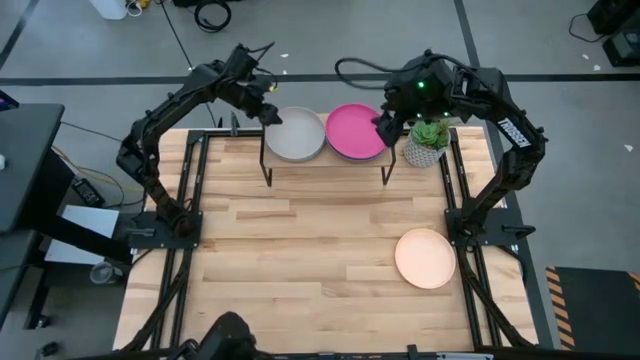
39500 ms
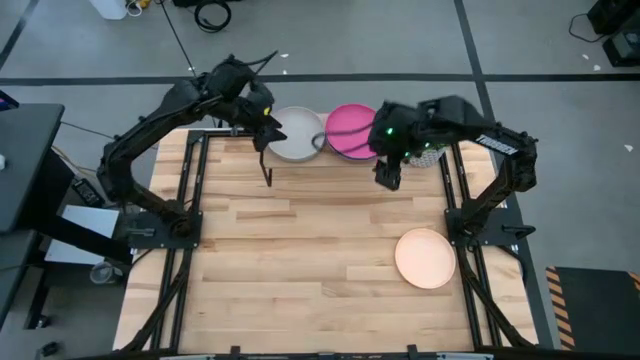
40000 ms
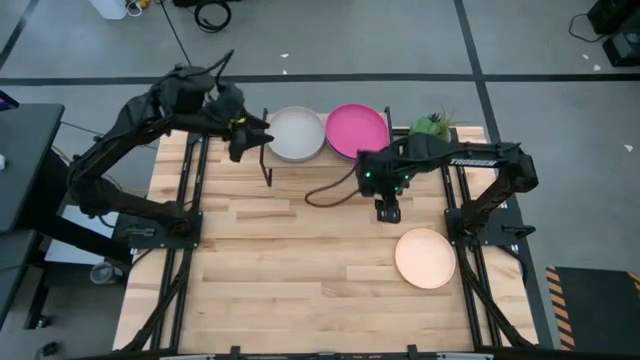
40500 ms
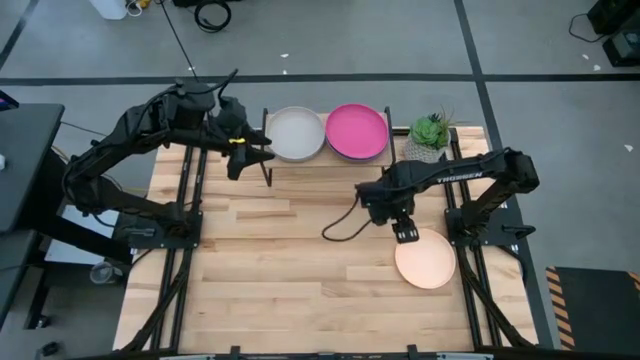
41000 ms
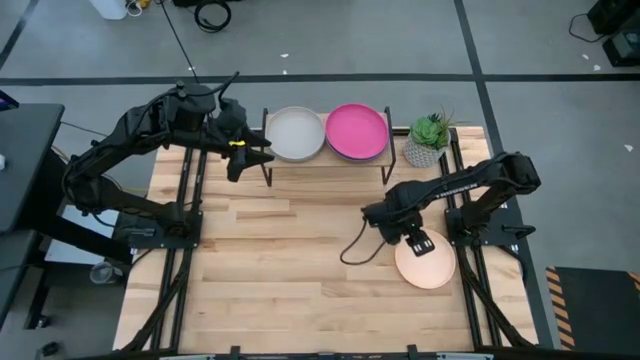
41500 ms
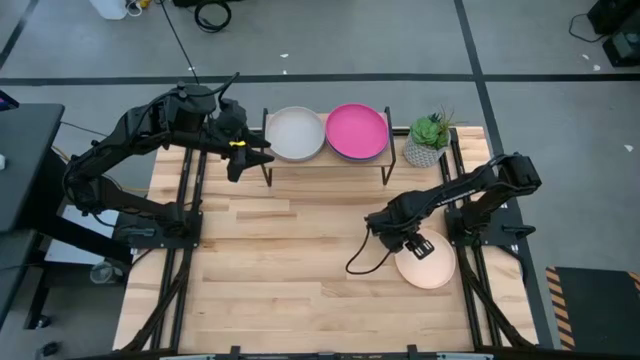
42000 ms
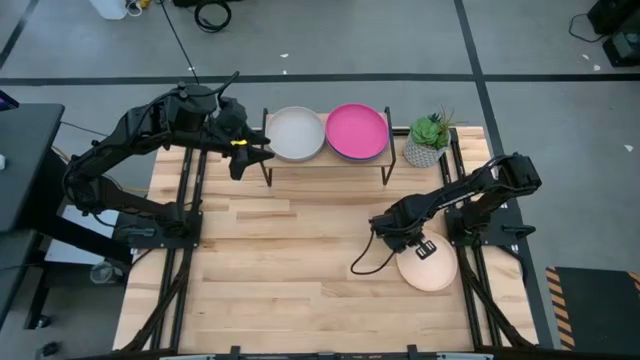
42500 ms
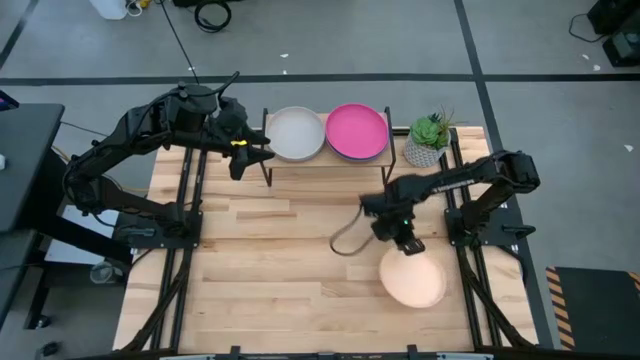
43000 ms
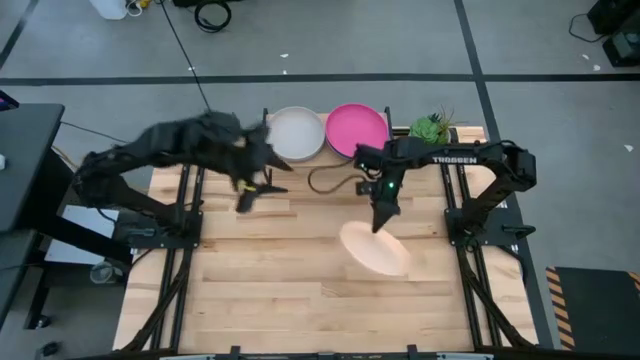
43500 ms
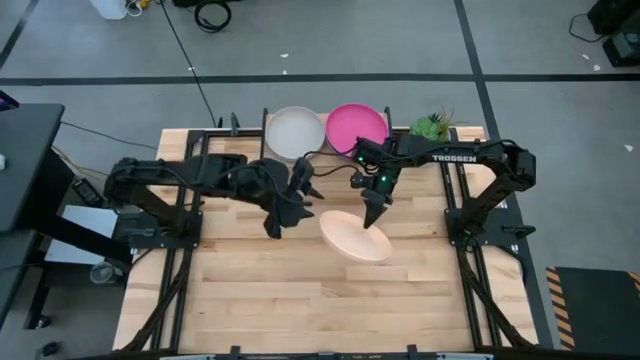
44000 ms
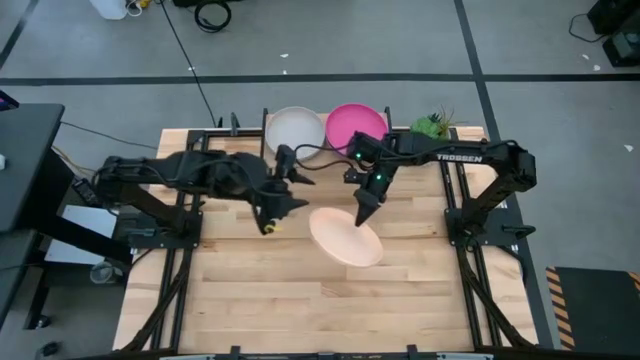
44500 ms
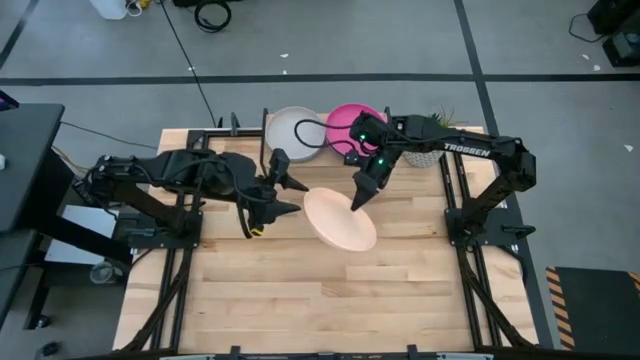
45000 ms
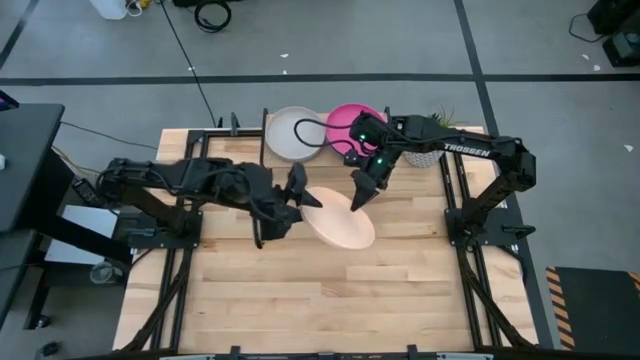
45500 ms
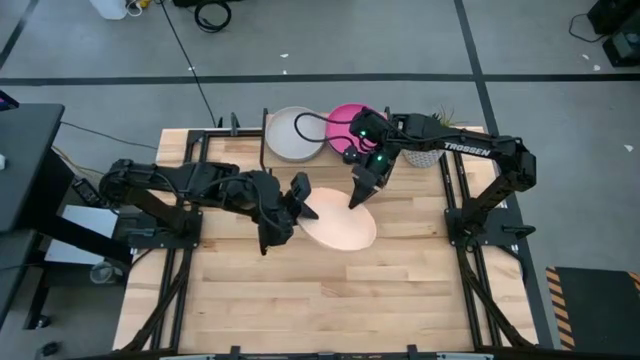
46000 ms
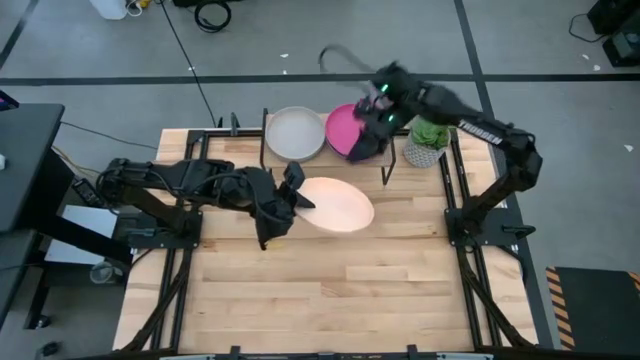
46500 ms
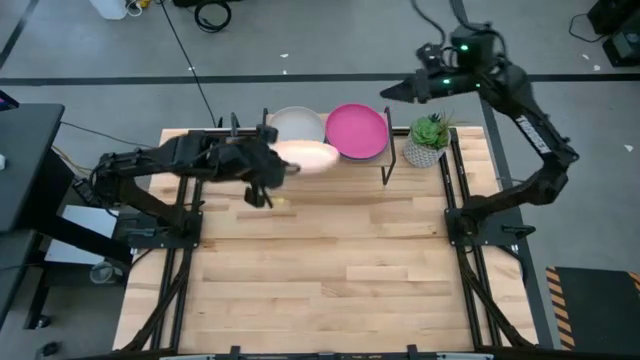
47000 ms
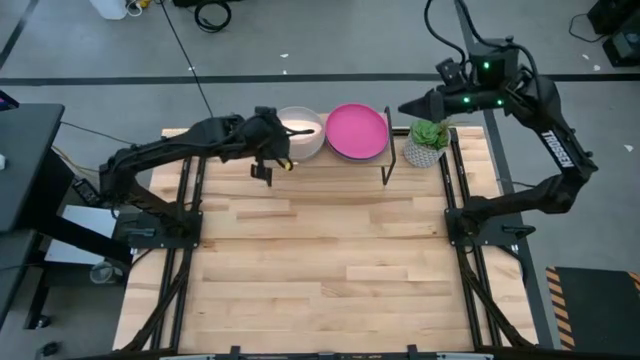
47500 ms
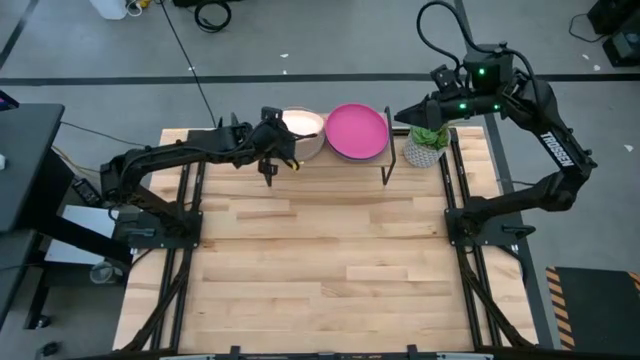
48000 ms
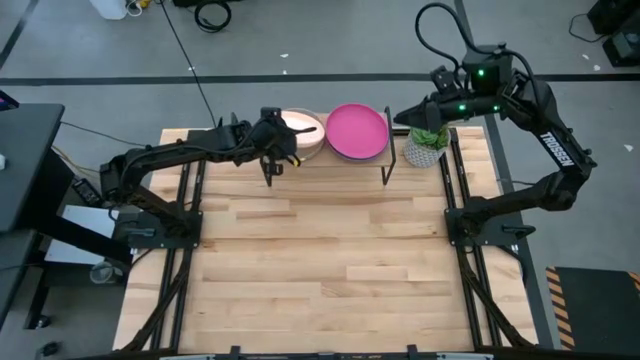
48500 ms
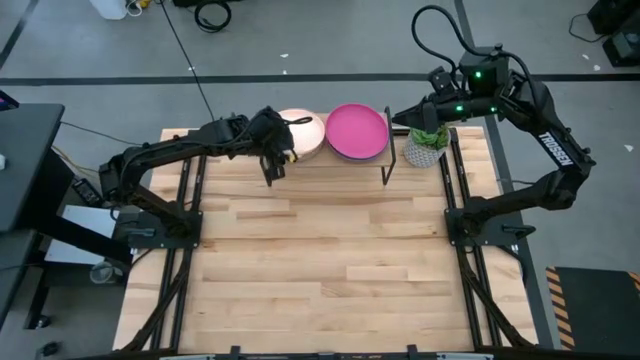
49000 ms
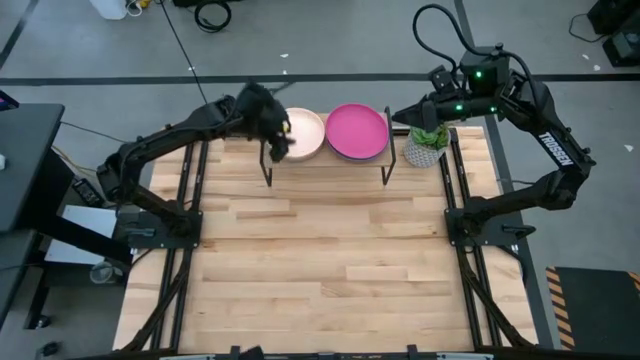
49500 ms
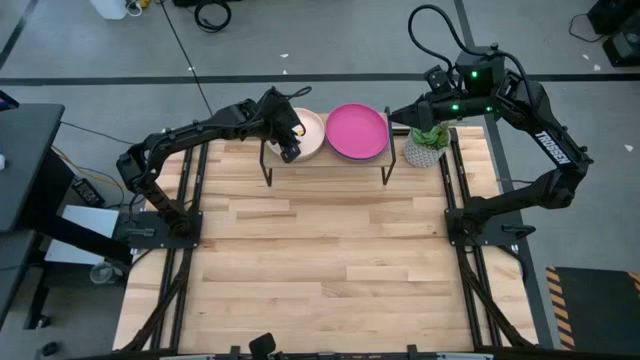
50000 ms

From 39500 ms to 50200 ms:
Task: Place and stack plates onto a shelf
Stack the light orange plate on top of the gray plate on the shelf

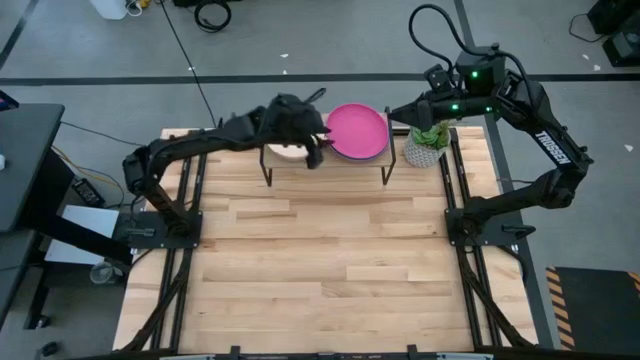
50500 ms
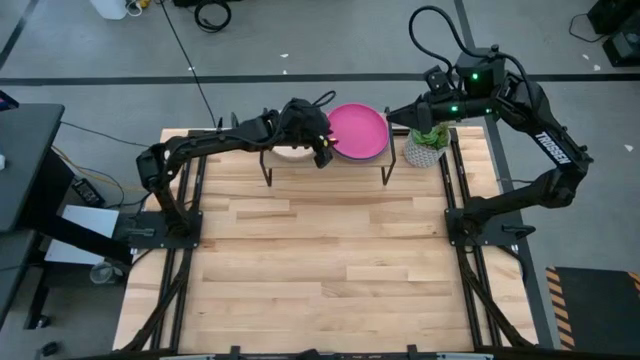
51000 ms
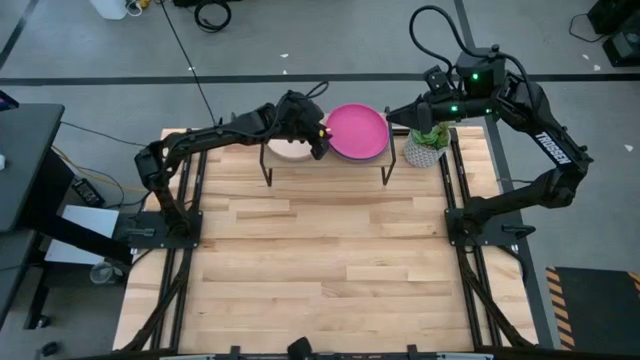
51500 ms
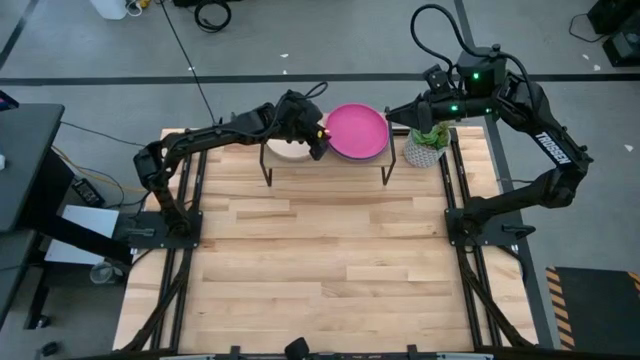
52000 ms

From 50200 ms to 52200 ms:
Adjust the right stacked plates on the shelf

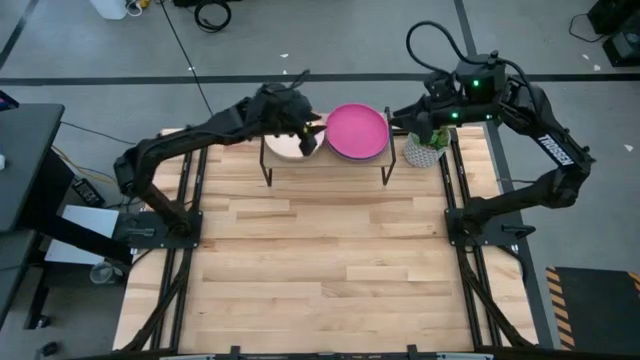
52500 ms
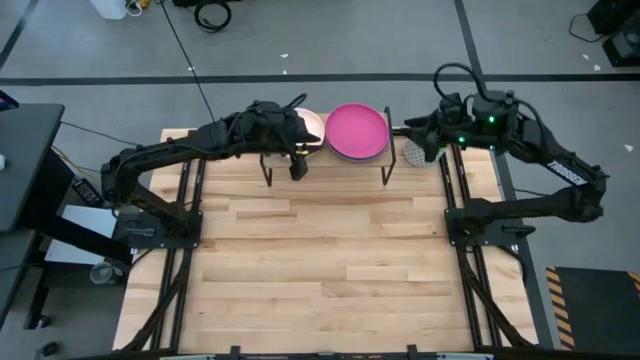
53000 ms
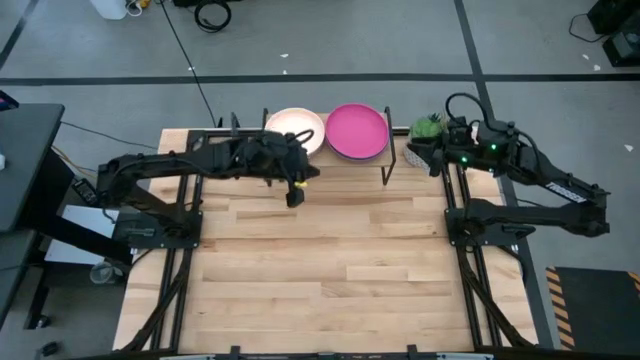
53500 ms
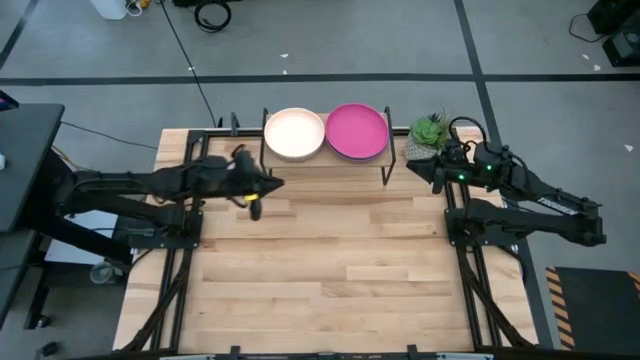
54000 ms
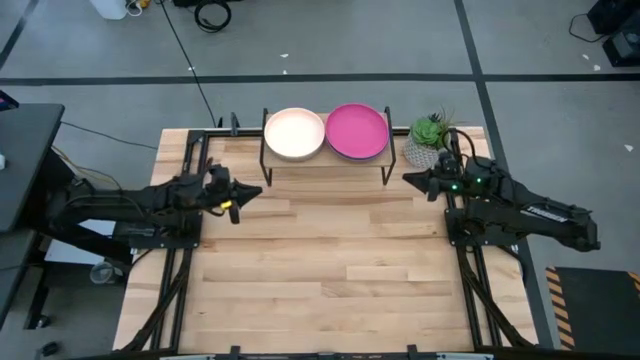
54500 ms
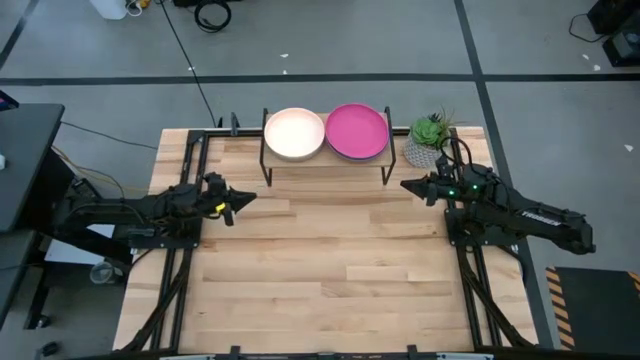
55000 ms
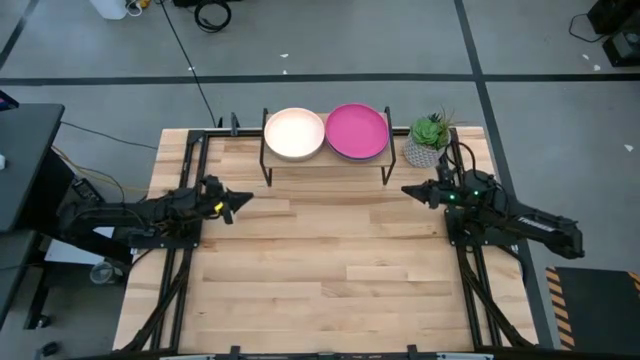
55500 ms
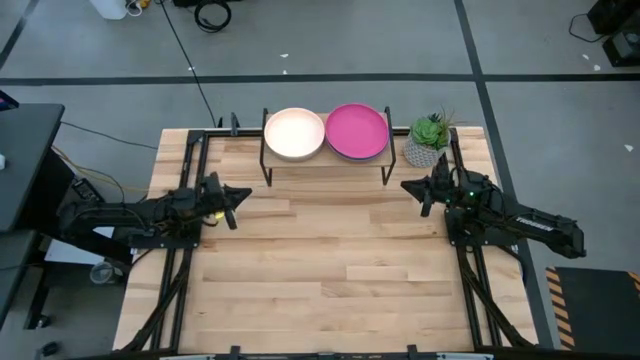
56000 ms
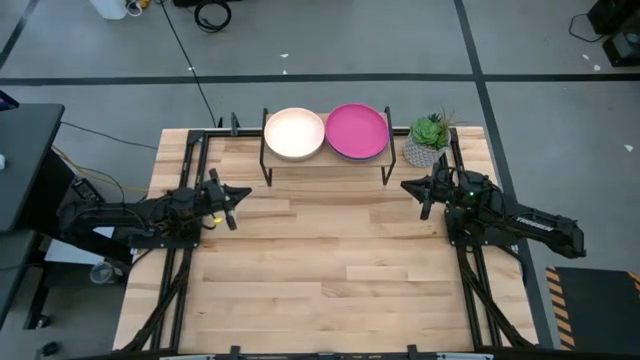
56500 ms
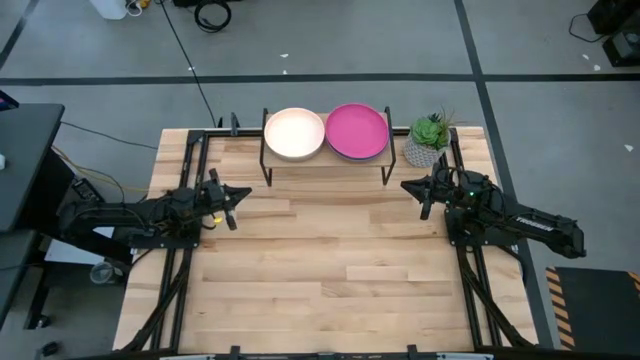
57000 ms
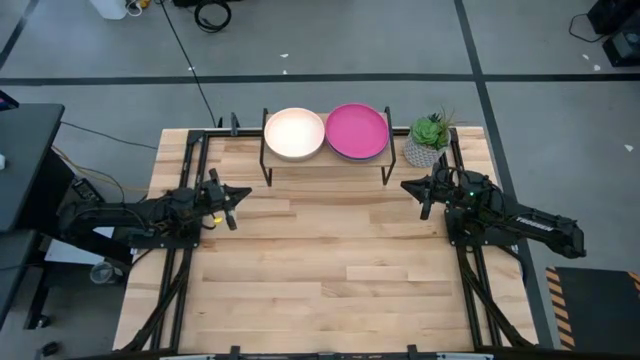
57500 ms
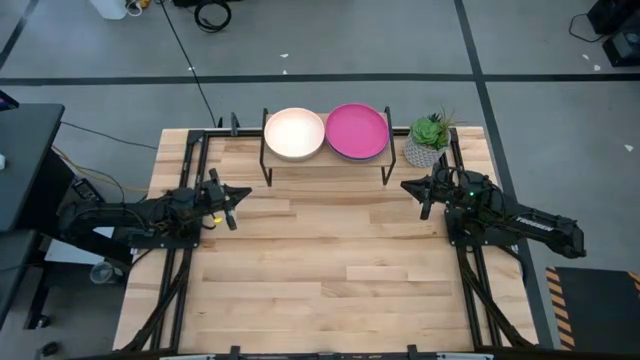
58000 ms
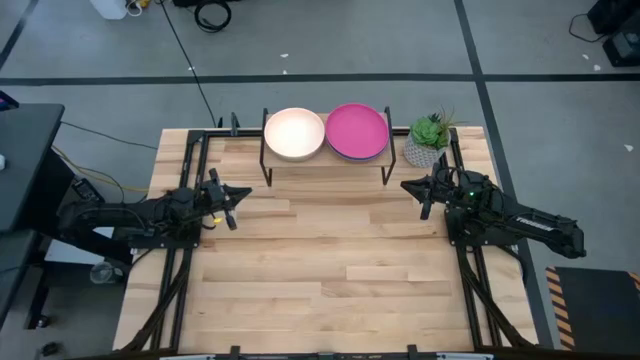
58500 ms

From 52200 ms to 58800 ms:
Return to Home Position

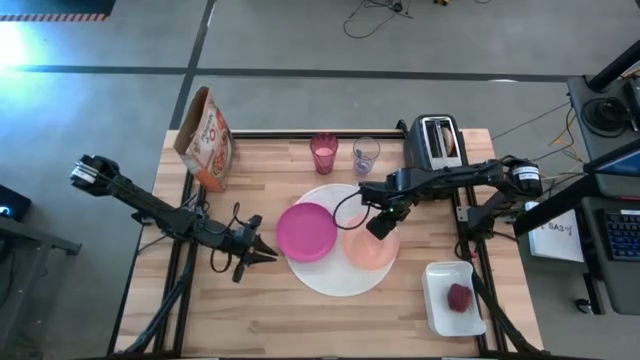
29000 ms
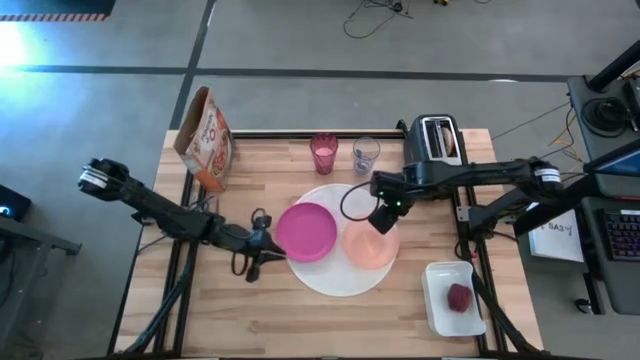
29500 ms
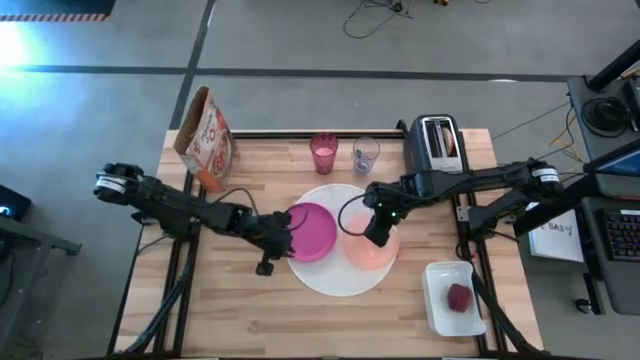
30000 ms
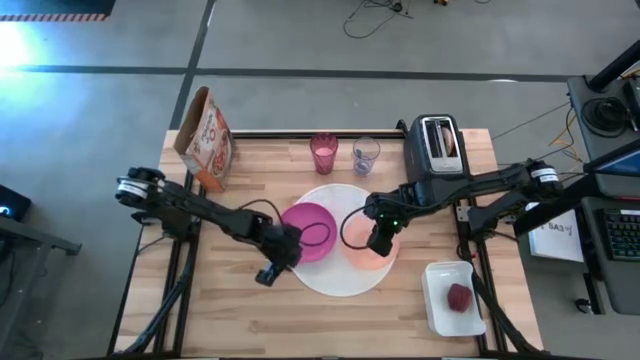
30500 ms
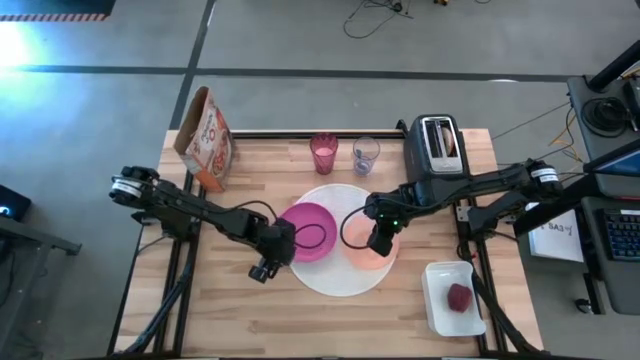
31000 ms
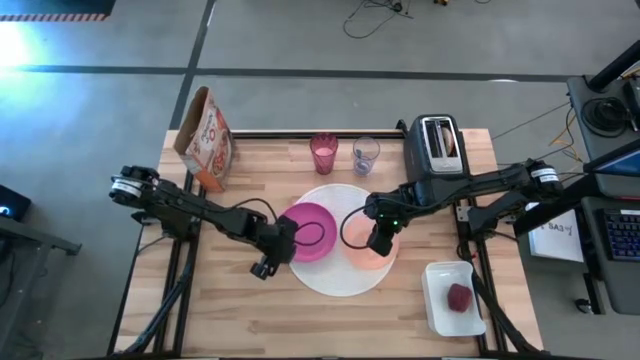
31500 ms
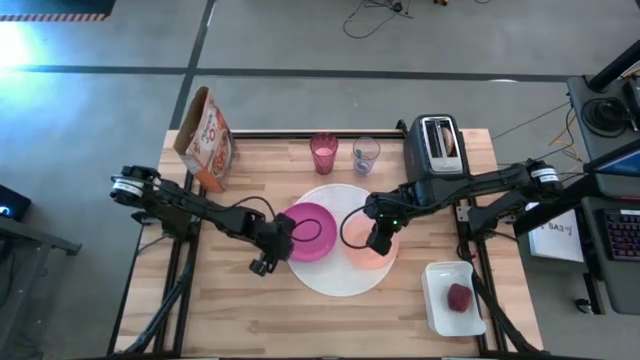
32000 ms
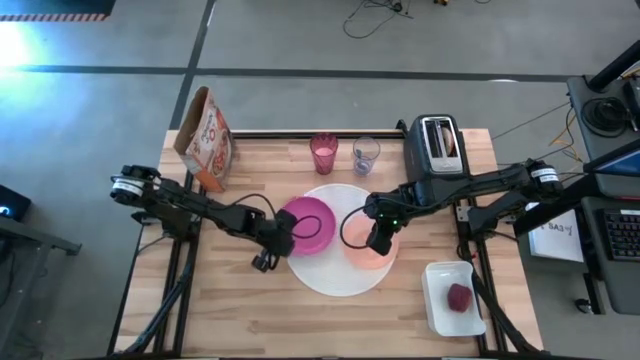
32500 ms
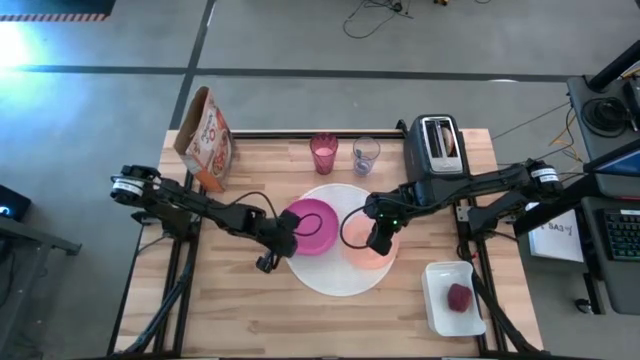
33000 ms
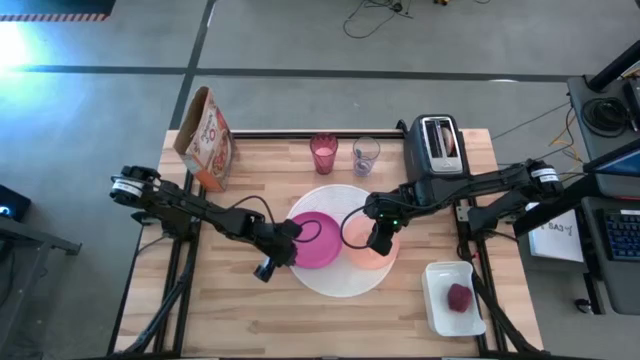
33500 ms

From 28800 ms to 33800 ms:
Task: Arrange a breakfast setting
Adjust the pink plate
